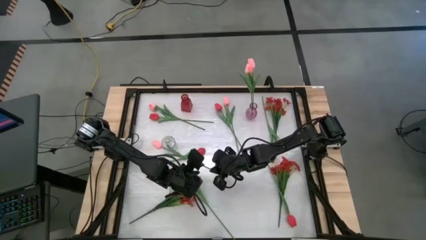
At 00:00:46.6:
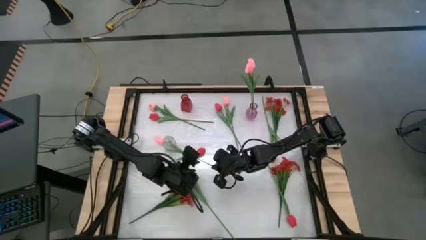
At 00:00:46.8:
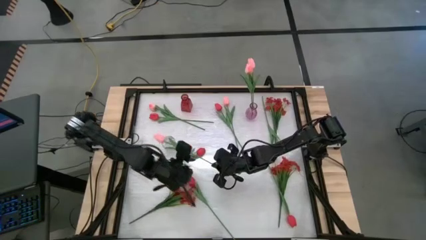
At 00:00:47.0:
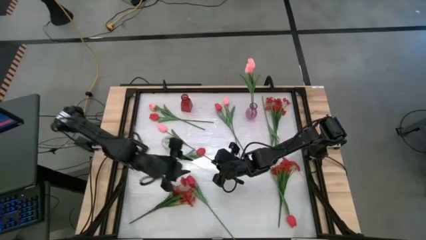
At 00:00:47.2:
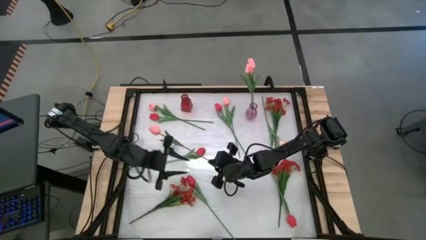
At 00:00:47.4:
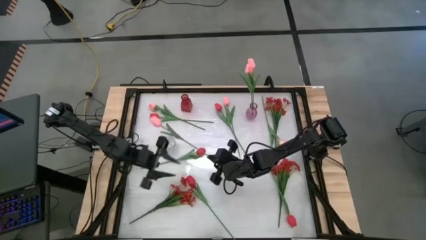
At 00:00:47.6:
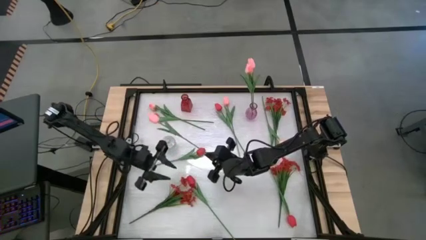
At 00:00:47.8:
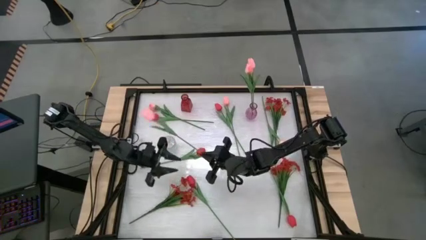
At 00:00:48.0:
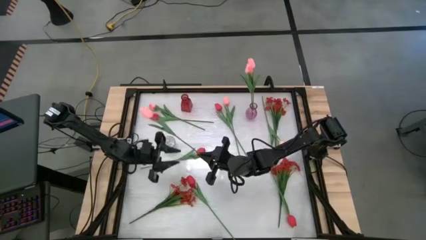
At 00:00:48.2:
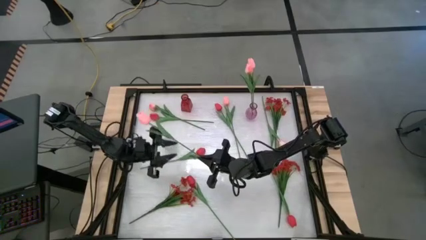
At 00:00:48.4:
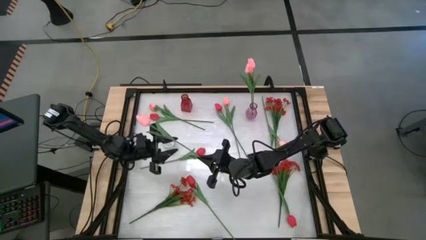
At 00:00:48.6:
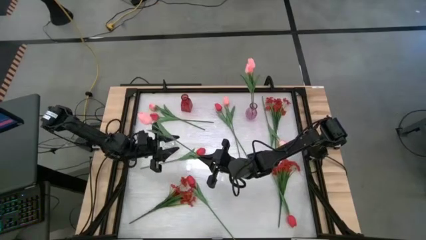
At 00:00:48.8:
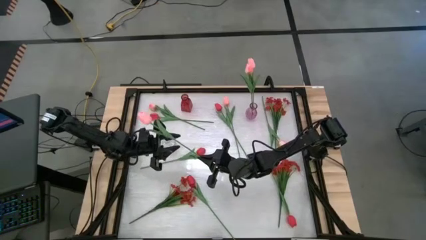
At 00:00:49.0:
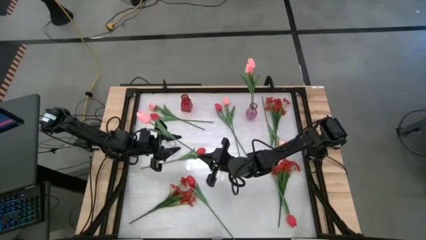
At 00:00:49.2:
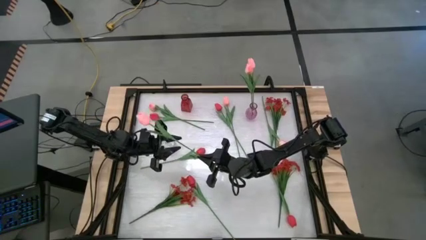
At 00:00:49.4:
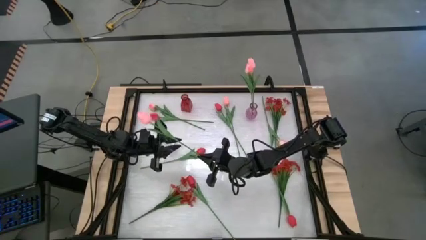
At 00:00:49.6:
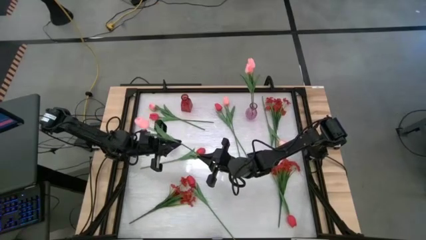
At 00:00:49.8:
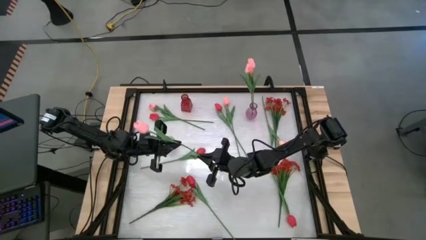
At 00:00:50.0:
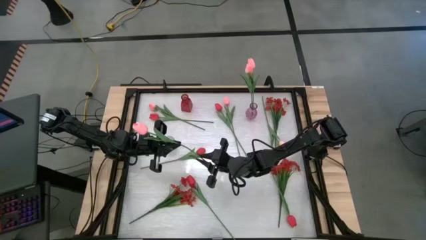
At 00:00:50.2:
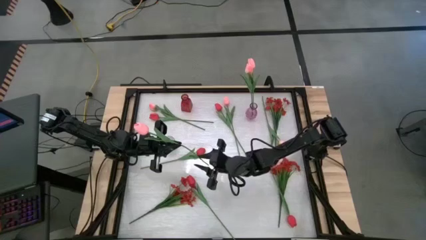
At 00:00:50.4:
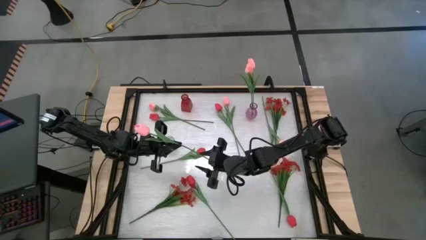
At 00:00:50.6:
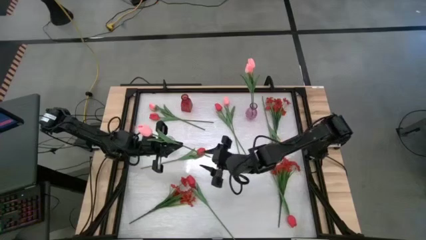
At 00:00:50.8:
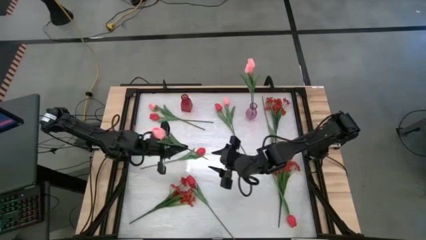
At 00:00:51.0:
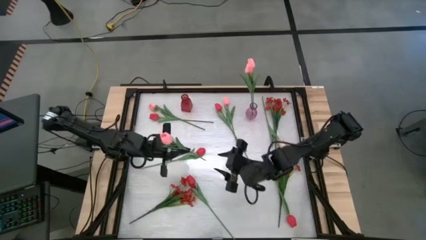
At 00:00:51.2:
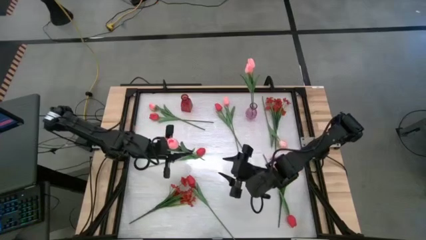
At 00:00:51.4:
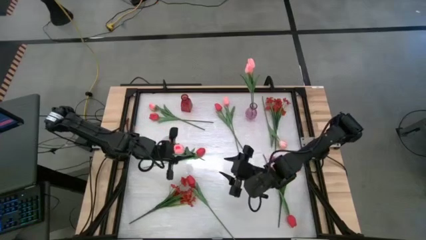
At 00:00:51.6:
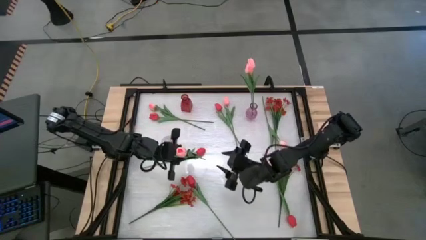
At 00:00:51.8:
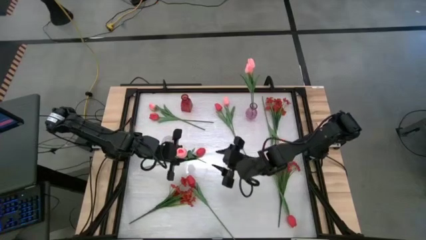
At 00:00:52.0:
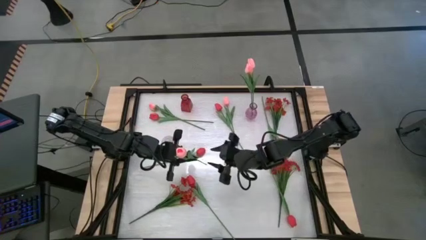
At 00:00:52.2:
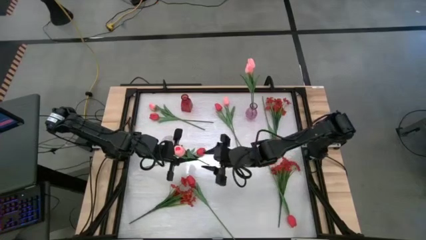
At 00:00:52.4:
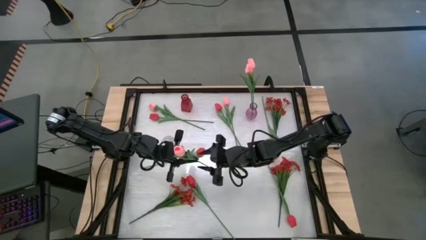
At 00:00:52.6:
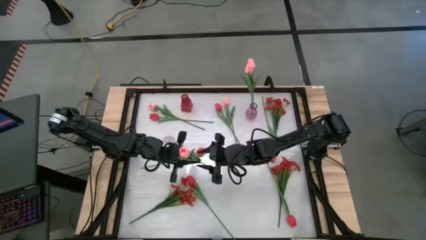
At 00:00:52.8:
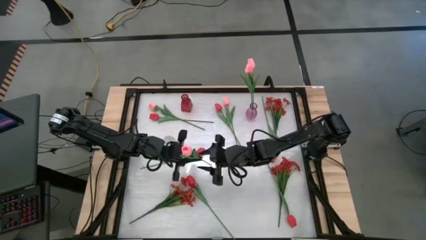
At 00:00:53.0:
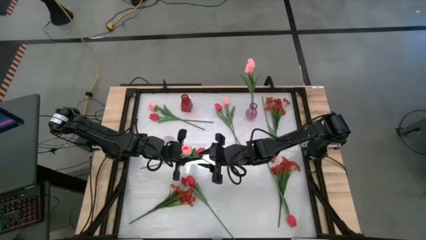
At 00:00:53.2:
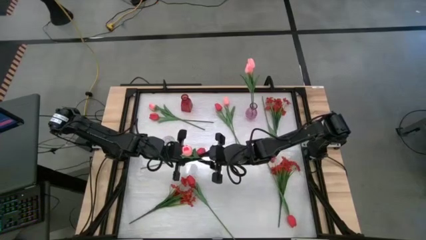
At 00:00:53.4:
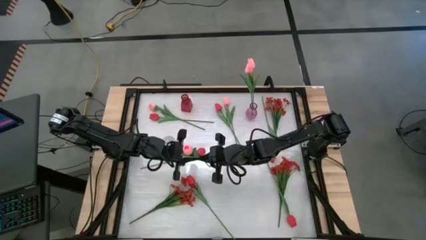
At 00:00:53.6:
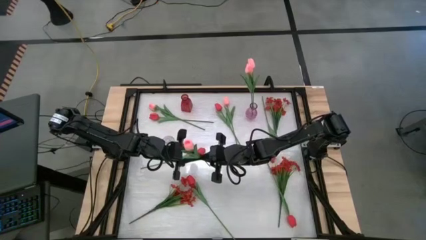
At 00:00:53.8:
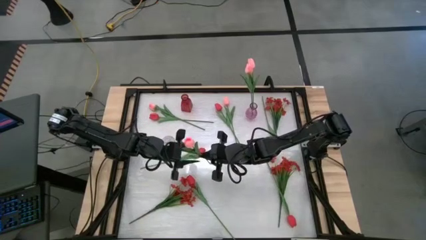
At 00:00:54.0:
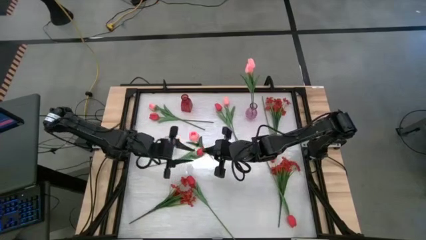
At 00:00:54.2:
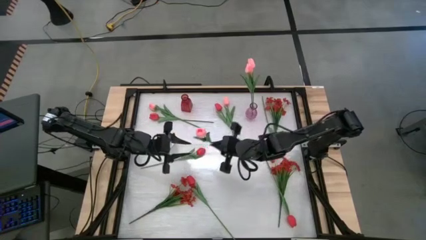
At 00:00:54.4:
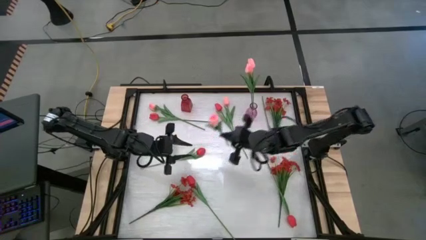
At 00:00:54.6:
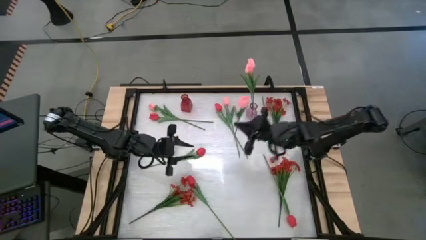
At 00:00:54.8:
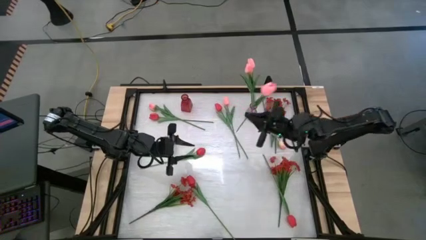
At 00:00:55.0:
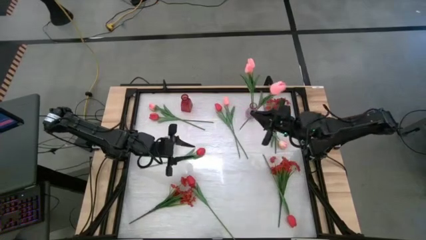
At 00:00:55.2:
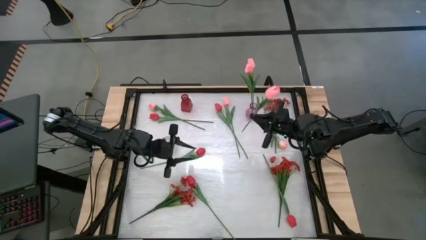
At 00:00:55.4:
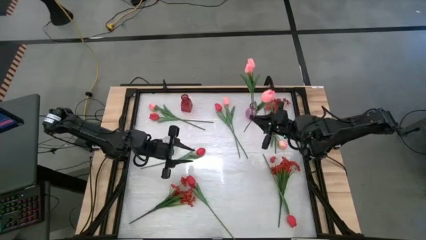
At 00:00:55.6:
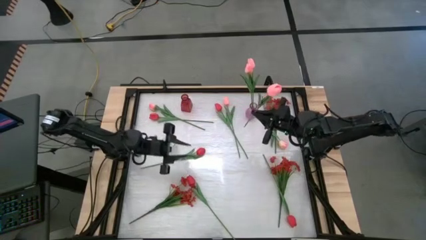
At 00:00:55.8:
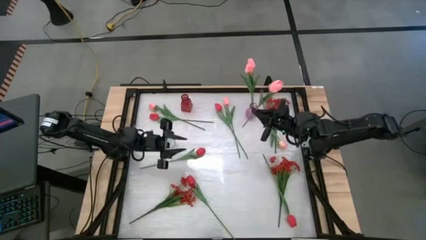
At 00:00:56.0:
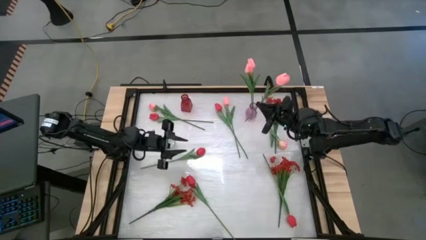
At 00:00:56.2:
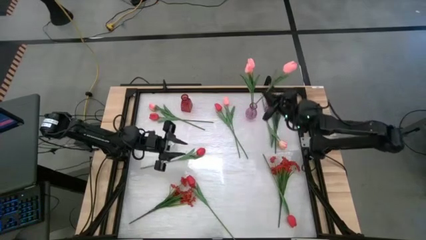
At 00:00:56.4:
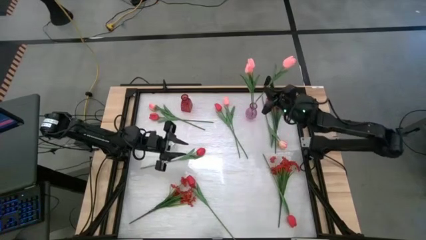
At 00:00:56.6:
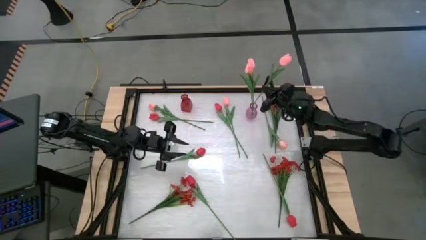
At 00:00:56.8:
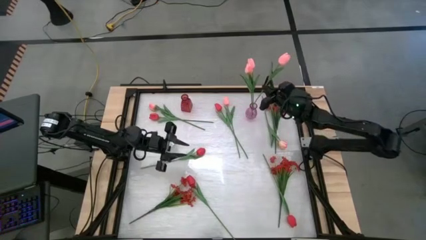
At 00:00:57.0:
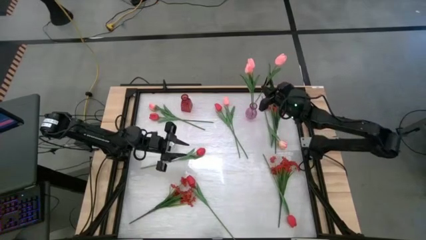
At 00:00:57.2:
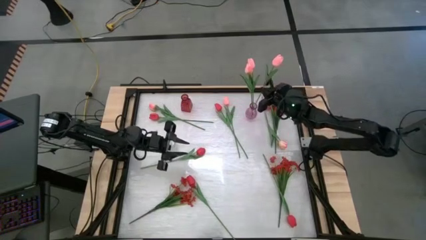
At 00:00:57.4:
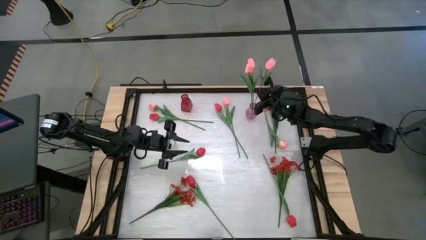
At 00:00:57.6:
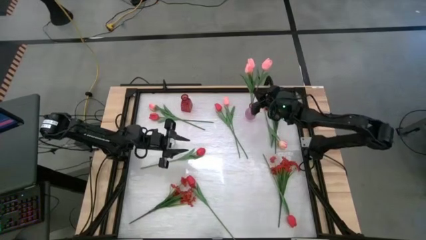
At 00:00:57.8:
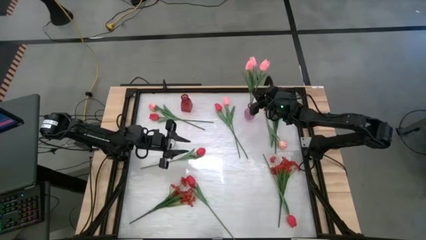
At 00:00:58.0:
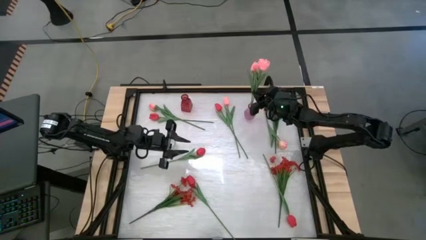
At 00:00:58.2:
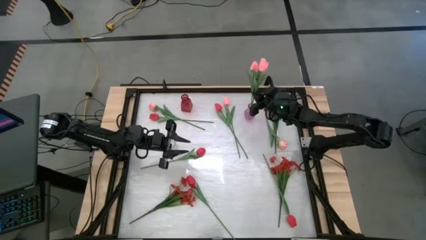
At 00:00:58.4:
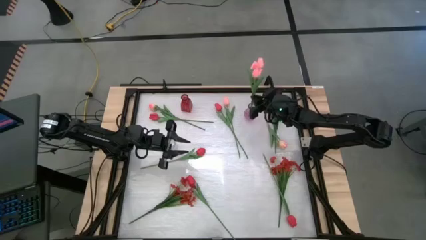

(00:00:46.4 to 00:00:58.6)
Task: Sort flowers into vase by color
Put the pink tulip into the purple vase

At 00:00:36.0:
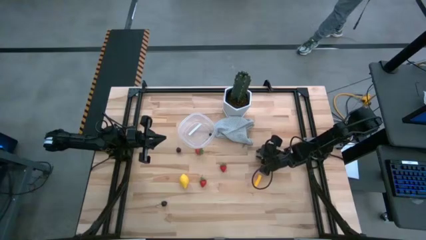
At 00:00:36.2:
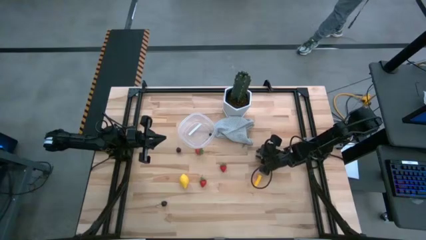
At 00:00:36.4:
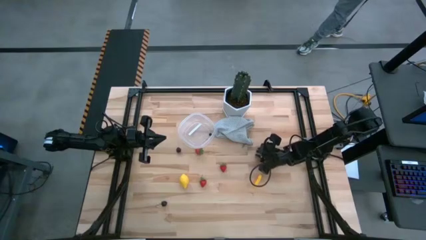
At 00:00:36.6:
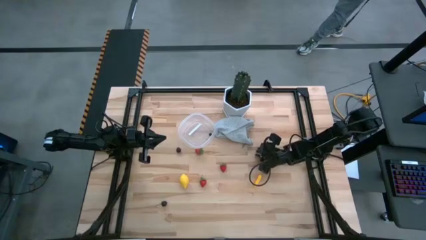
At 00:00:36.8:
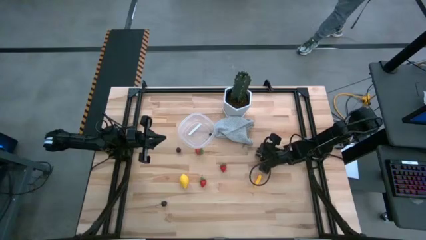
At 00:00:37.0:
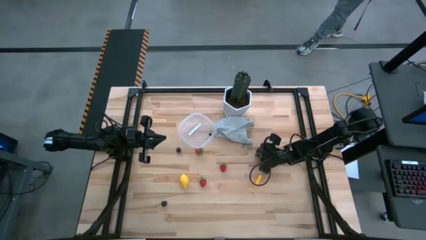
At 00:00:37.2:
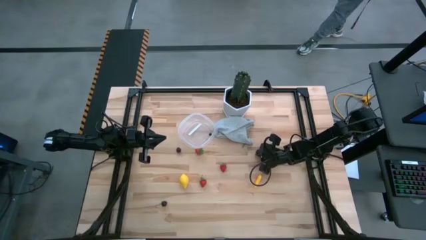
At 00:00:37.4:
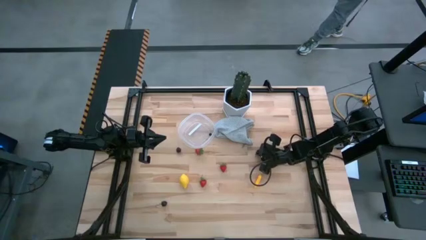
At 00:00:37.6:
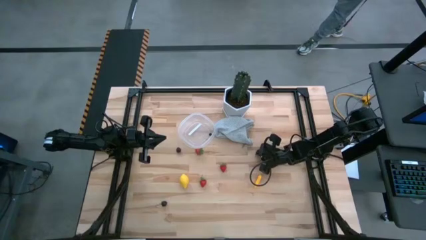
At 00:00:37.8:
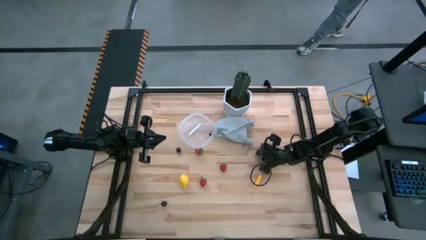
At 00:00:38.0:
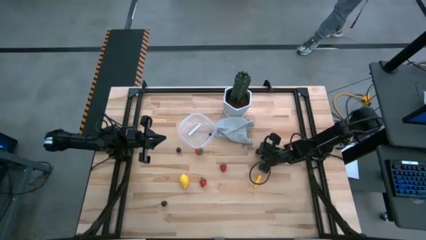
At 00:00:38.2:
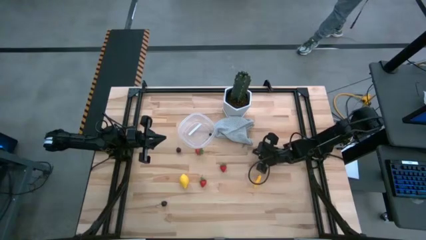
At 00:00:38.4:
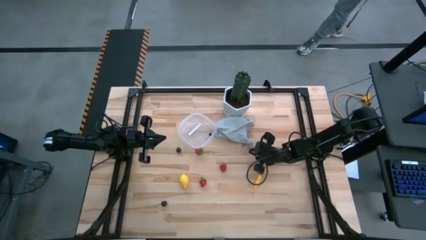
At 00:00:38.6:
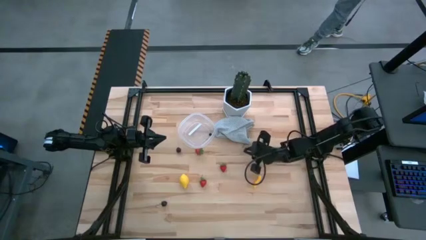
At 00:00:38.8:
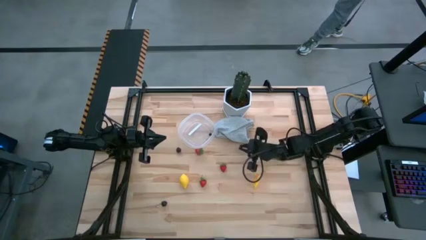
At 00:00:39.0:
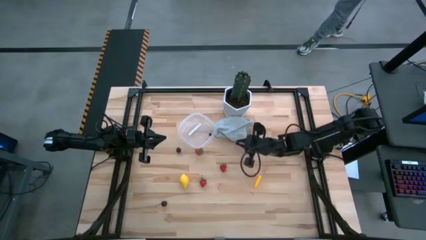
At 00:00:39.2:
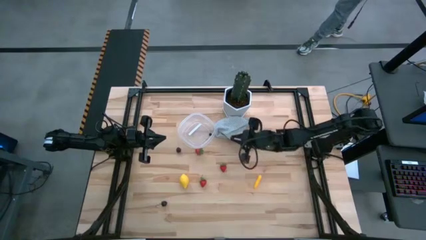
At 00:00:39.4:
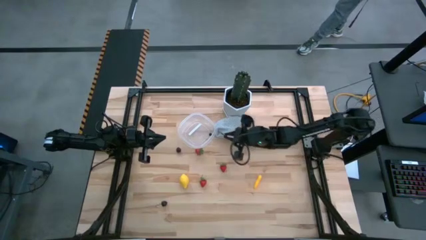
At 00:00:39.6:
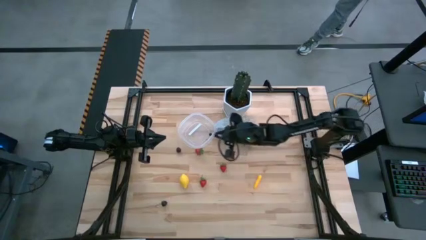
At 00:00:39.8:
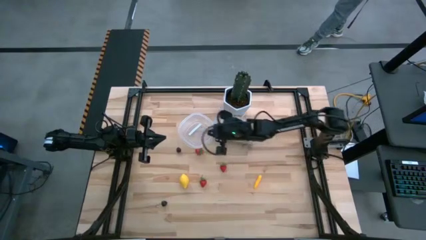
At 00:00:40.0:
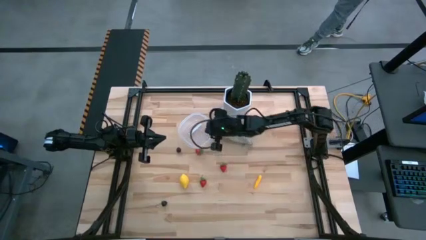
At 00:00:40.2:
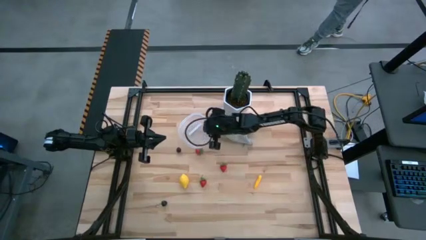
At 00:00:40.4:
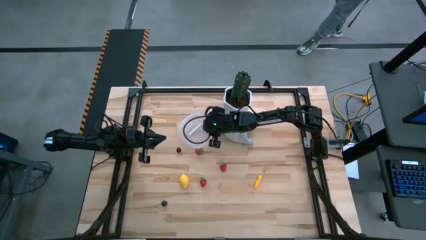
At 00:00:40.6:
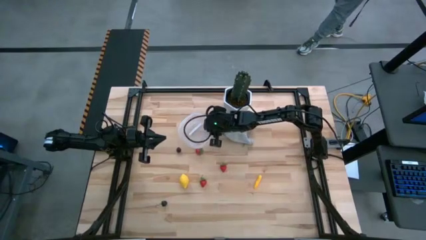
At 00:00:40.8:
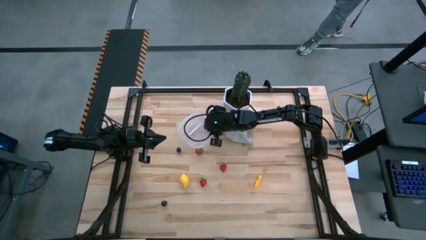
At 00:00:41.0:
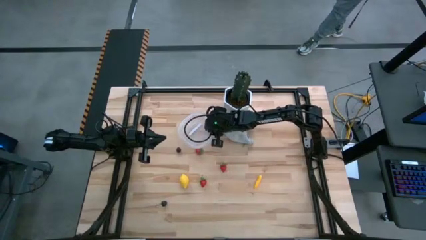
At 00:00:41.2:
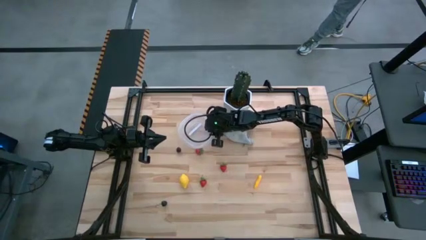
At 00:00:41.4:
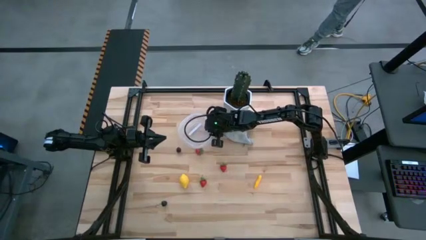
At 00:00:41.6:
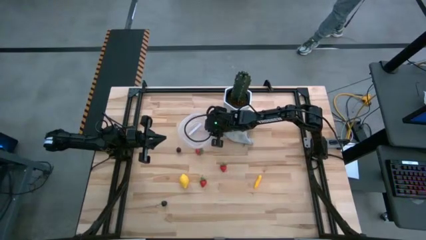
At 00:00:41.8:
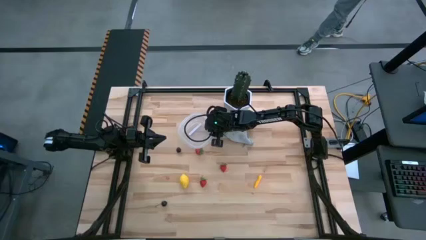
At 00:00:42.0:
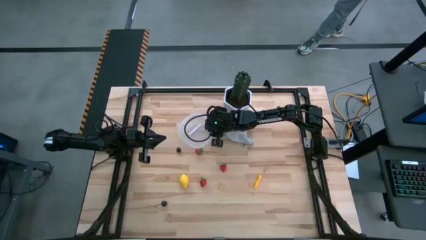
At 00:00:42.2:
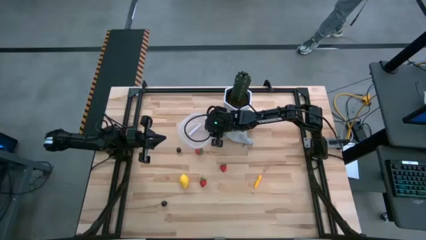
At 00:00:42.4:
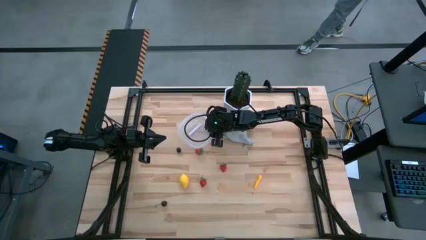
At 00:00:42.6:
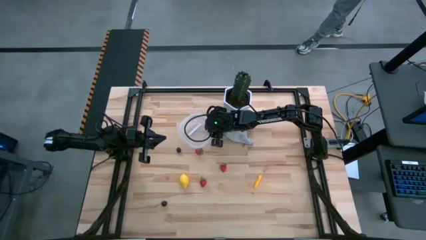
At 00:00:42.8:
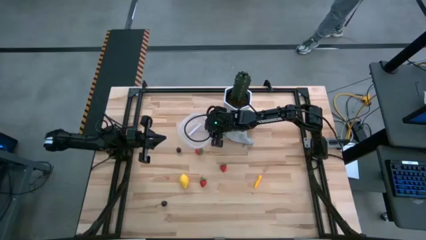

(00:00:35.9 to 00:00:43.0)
Task: Pick and placing Produce into tupperware
Put the blueberry into the transparent bin
